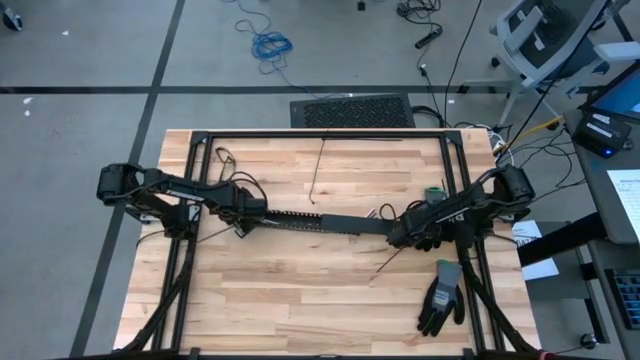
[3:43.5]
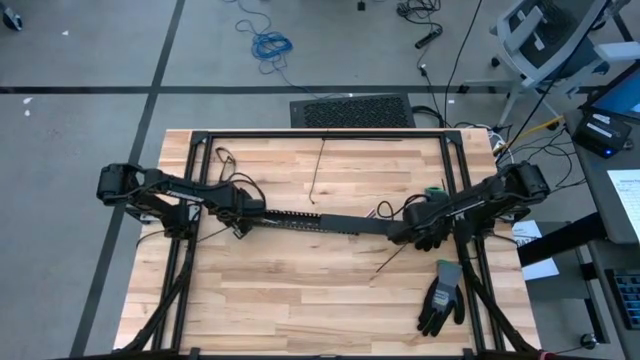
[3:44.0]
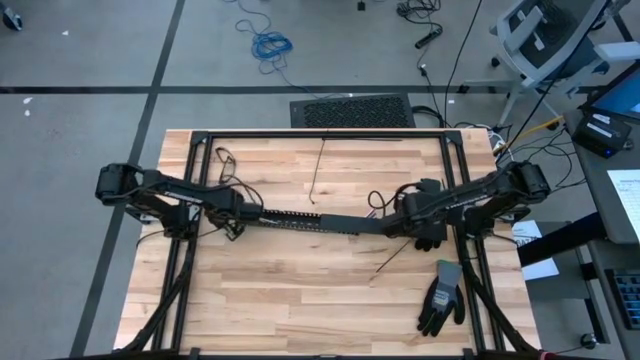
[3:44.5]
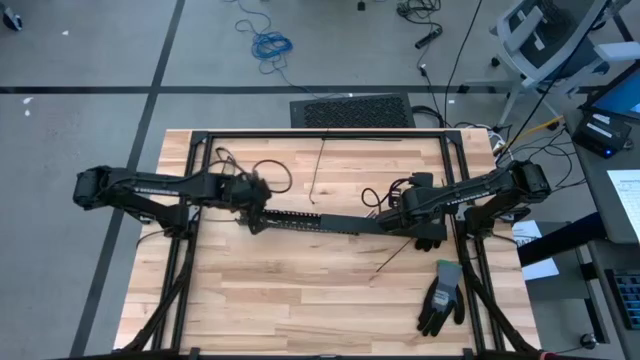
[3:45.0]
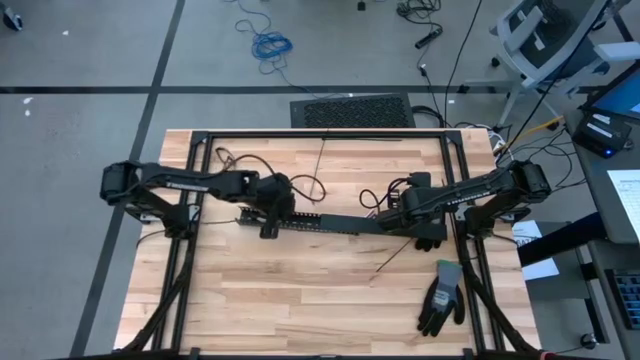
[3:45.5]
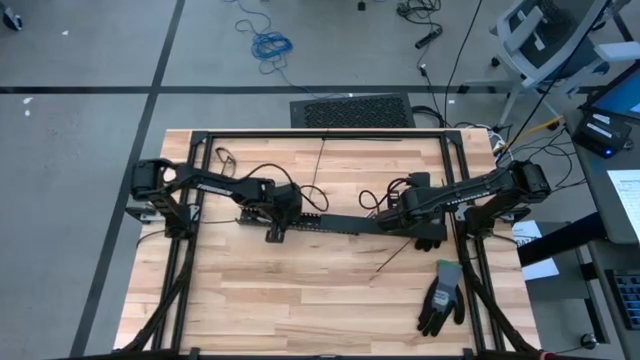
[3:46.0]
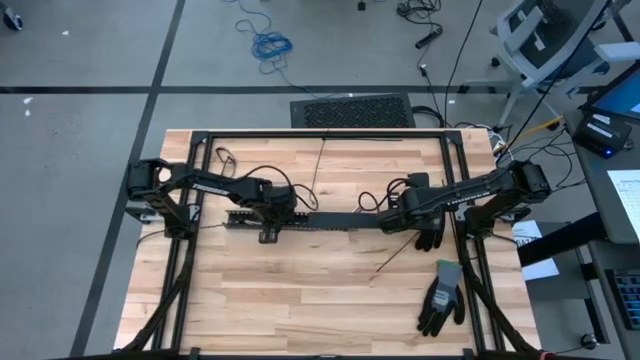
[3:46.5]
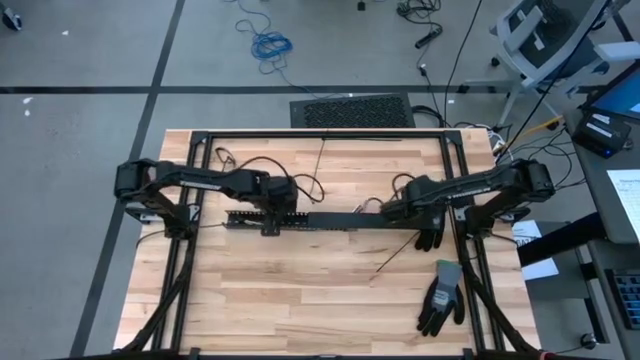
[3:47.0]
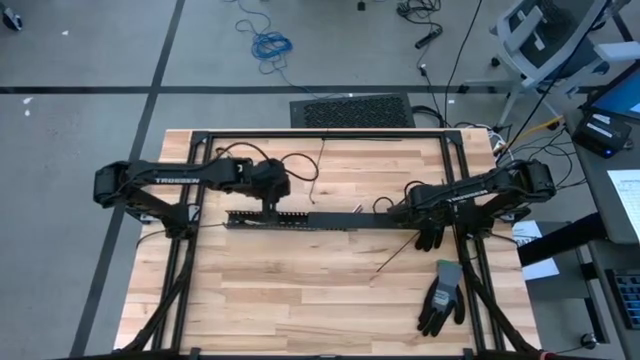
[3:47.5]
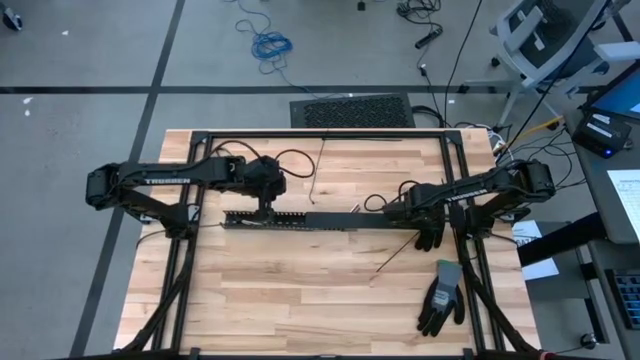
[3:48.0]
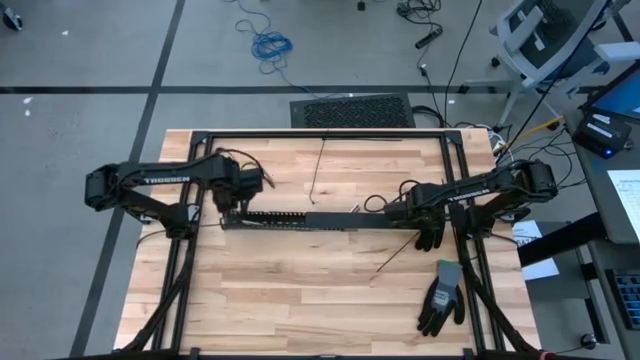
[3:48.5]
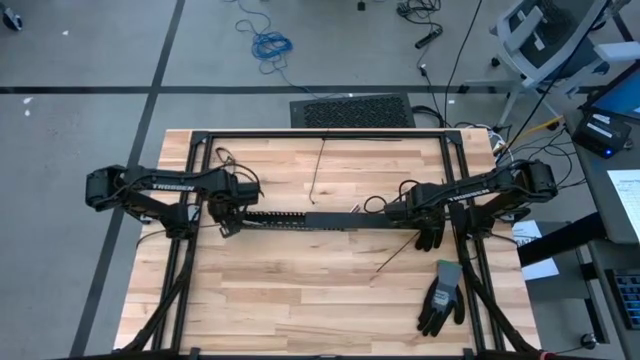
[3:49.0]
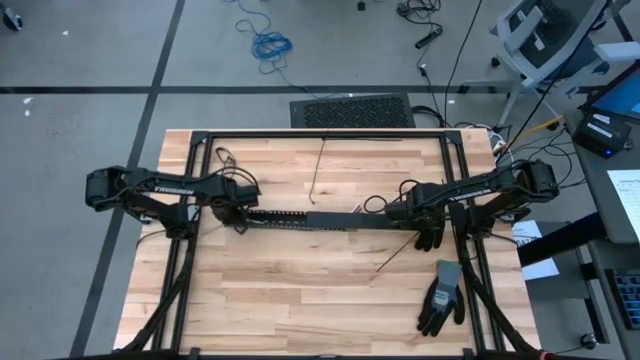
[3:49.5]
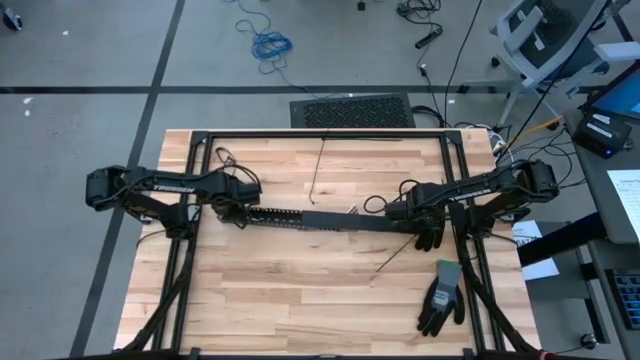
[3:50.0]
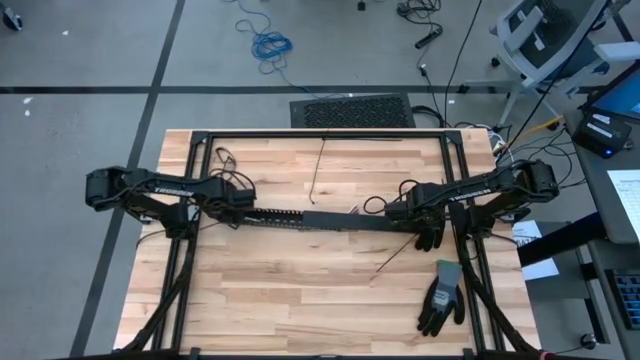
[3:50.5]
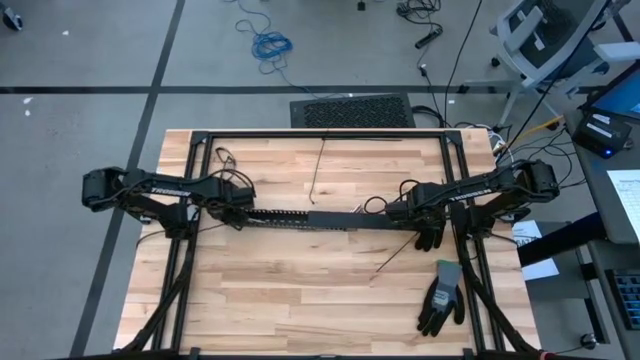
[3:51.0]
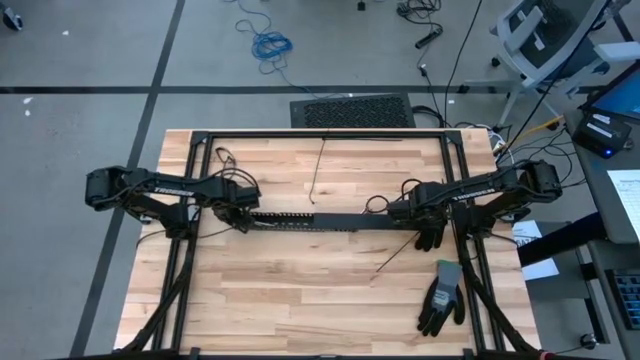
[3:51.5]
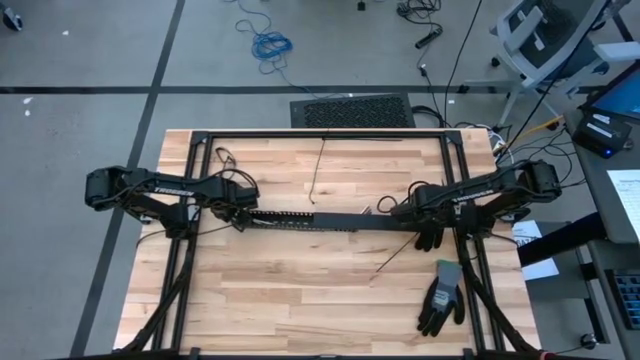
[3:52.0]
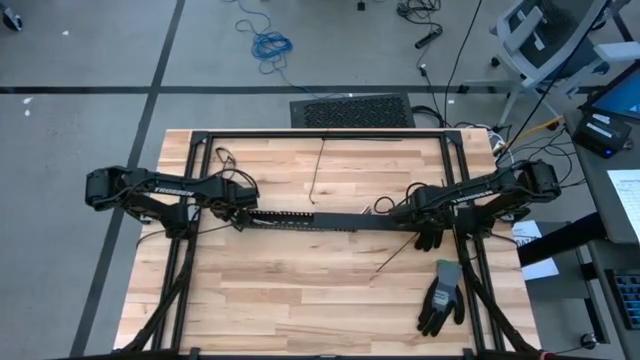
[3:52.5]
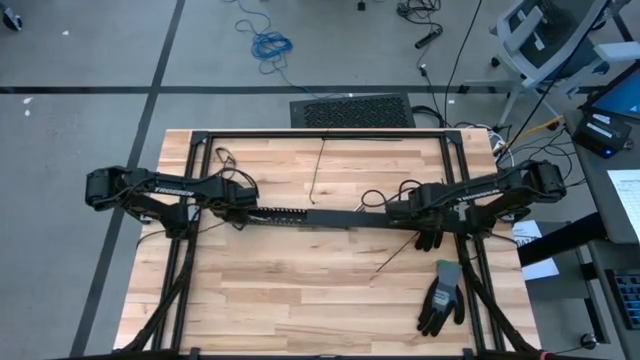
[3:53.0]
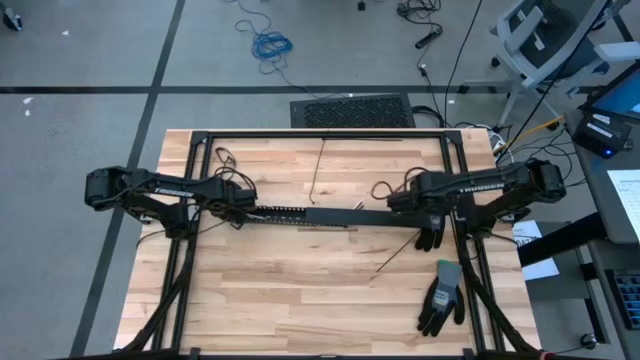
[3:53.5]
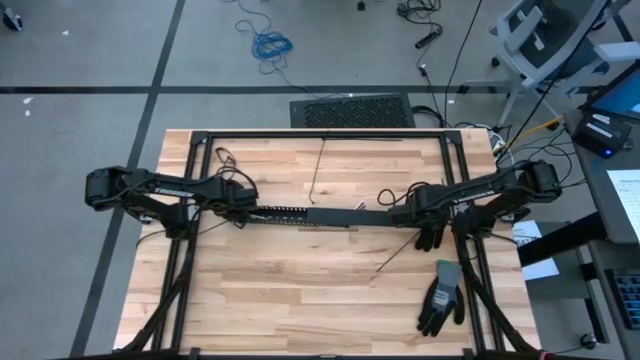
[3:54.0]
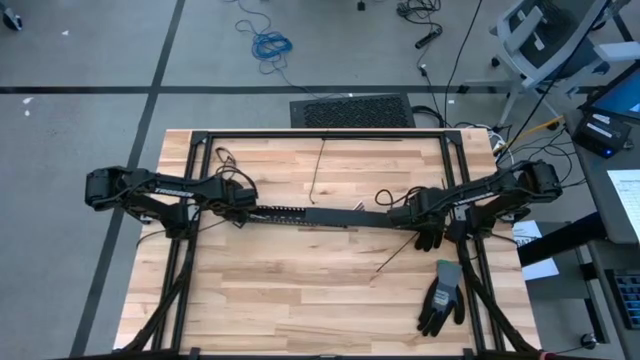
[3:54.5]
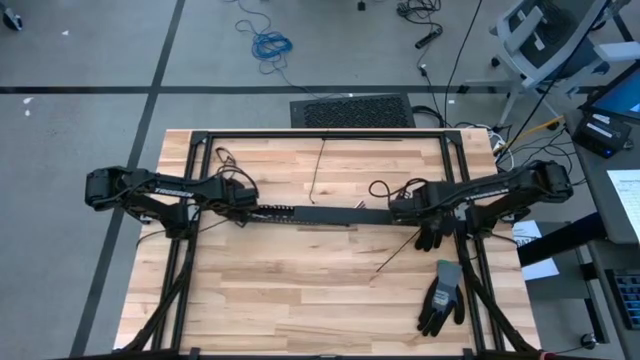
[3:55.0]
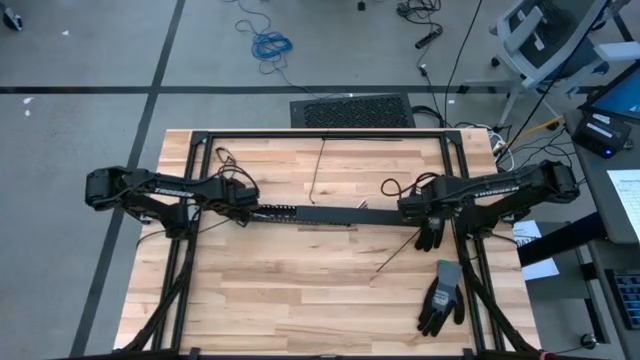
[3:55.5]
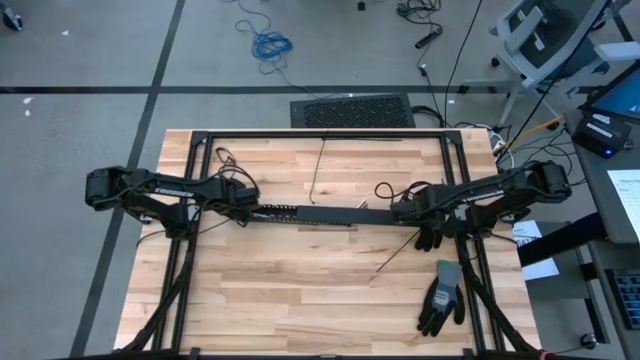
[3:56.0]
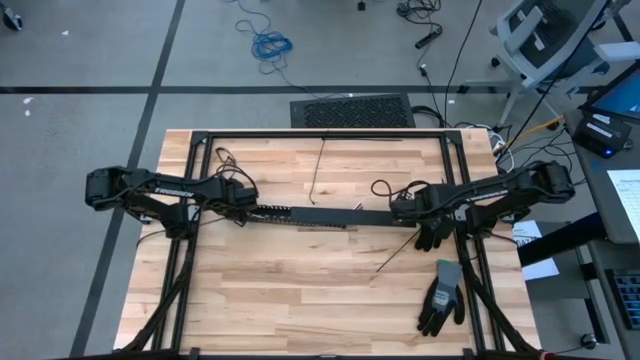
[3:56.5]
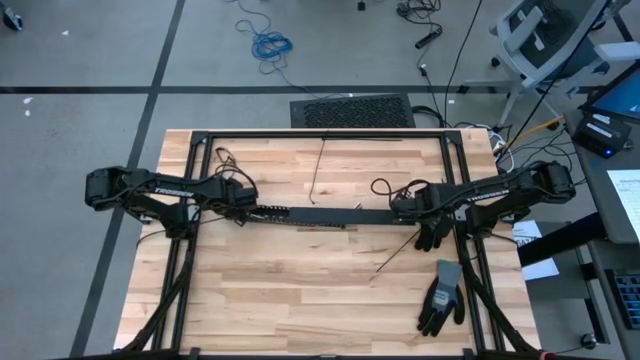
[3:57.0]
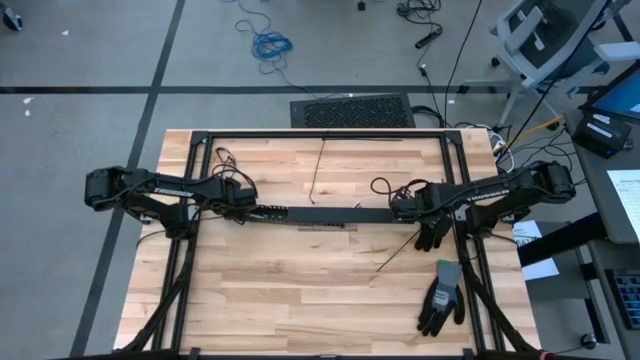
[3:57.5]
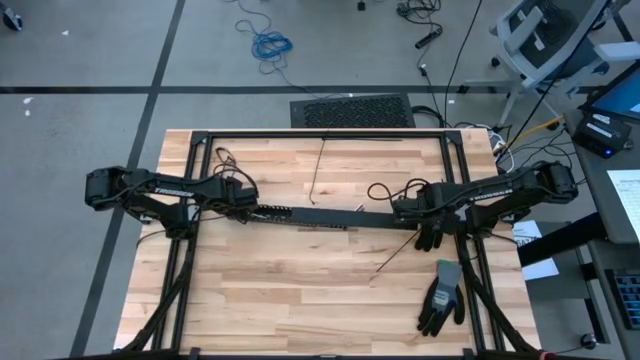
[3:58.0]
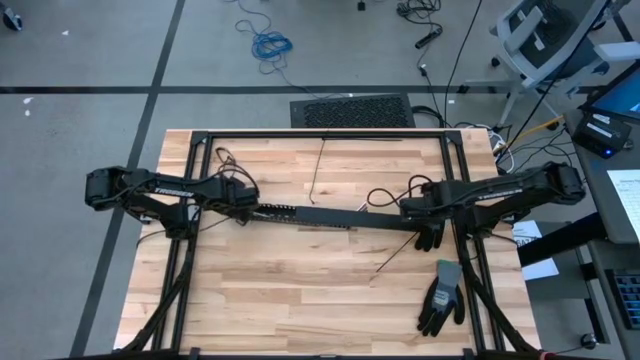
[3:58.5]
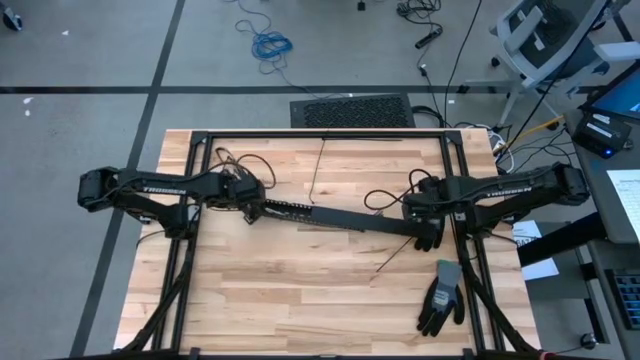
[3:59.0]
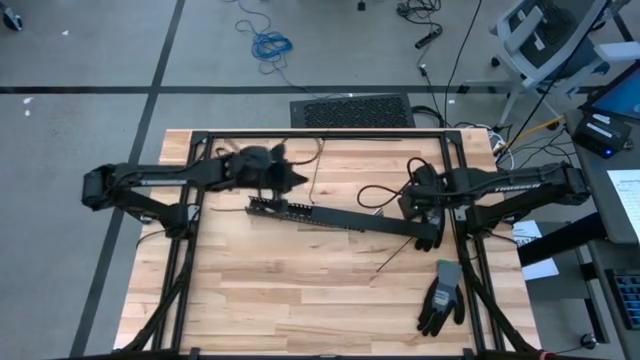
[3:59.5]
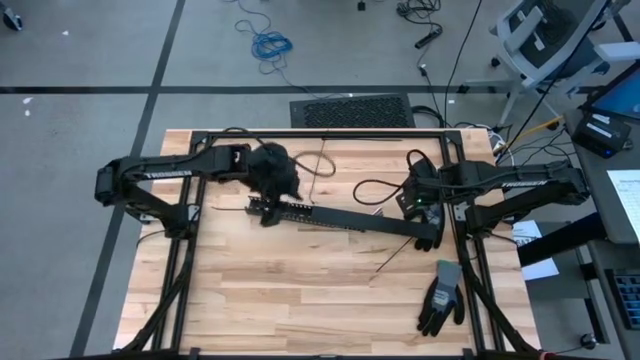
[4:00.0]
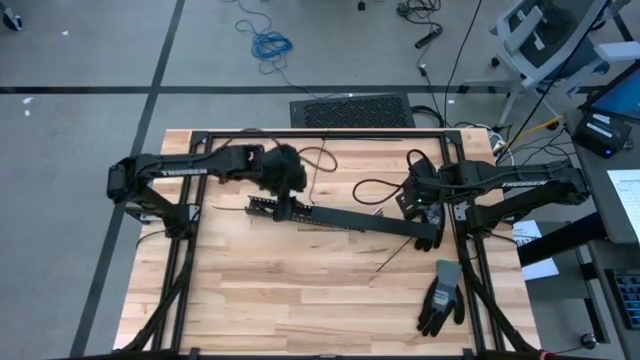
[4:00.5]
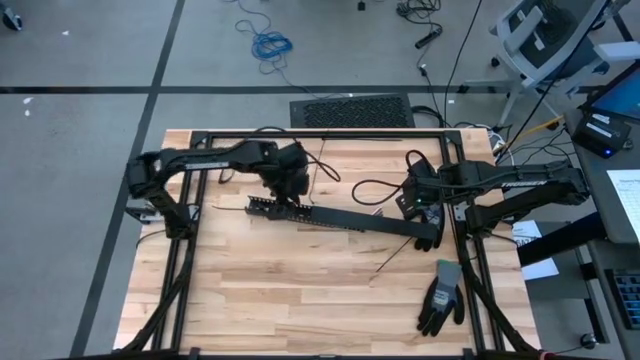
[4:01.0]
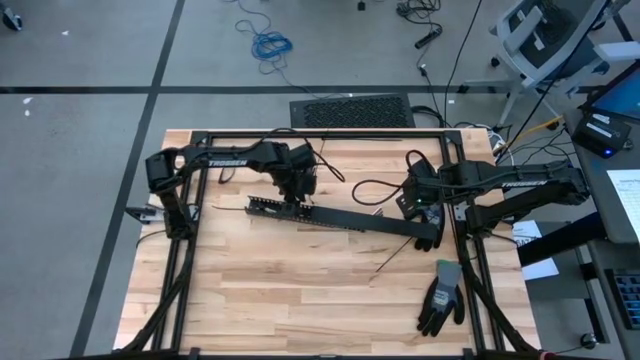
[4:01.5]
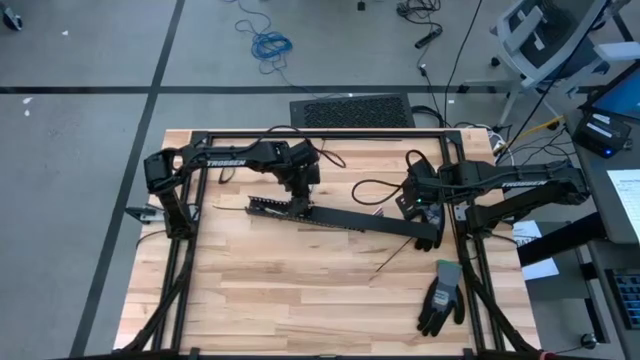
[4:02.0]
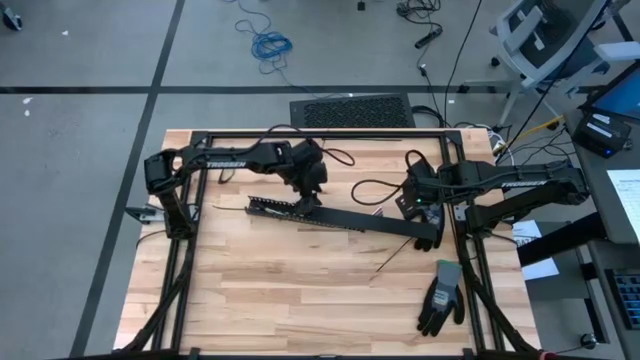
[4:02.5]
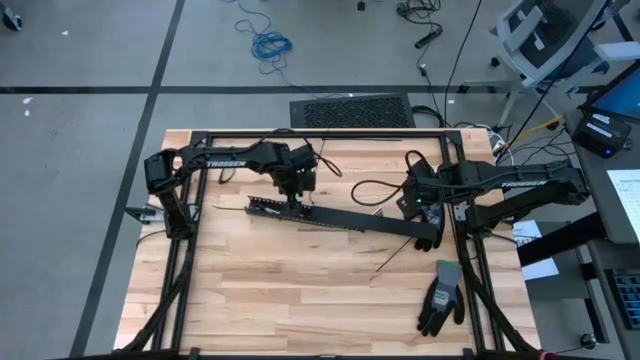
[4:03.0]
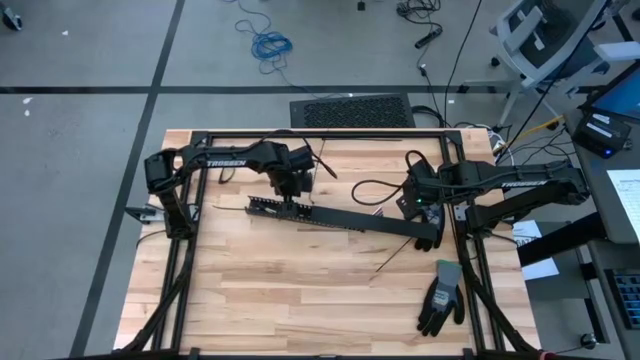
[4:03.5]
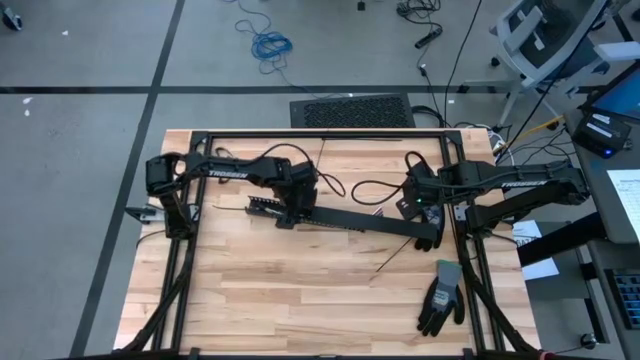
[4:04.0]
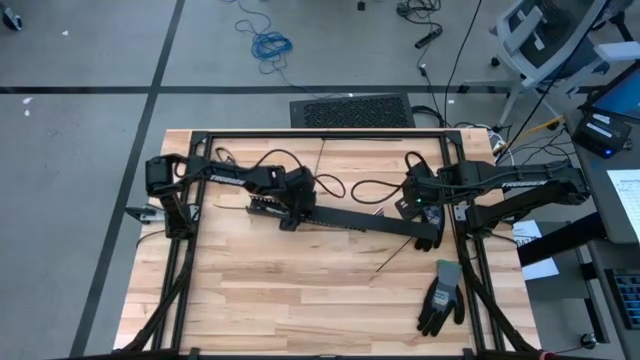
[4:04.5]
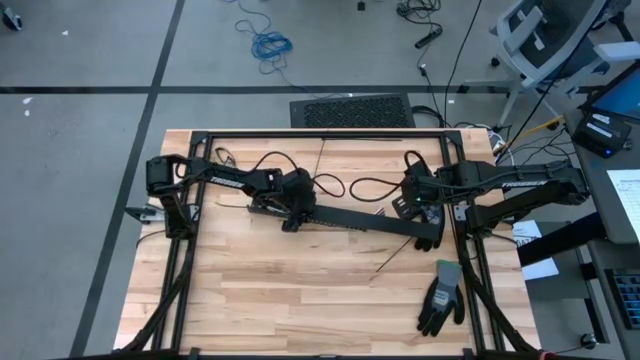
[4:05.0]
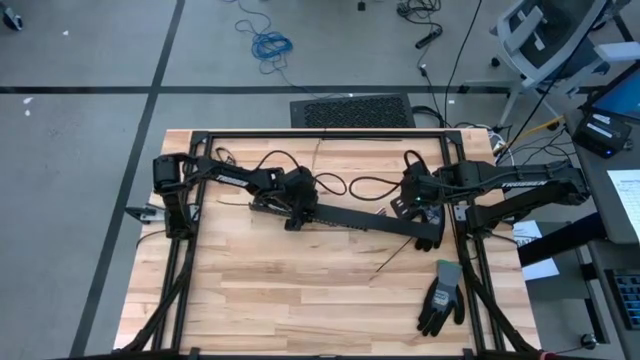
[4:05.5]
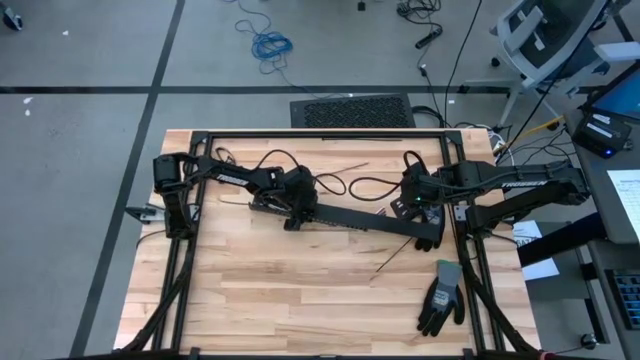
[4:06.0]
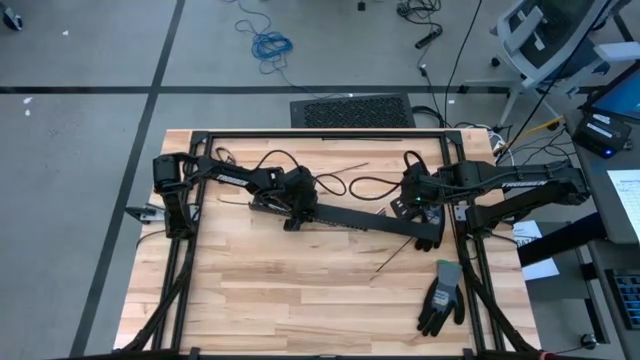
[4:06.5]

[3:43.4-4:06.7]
Task: Ziptie cables
Close the black cable duct cover
